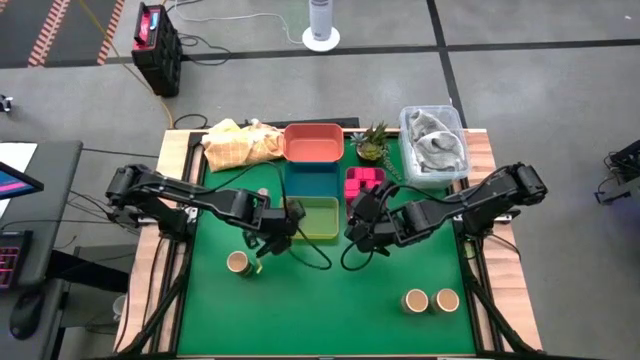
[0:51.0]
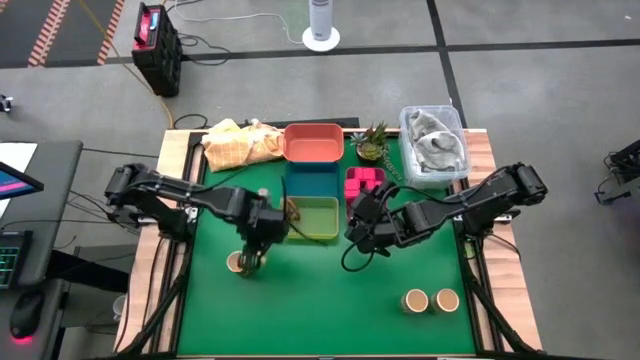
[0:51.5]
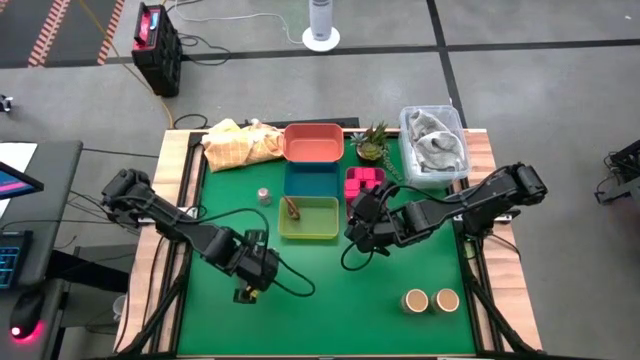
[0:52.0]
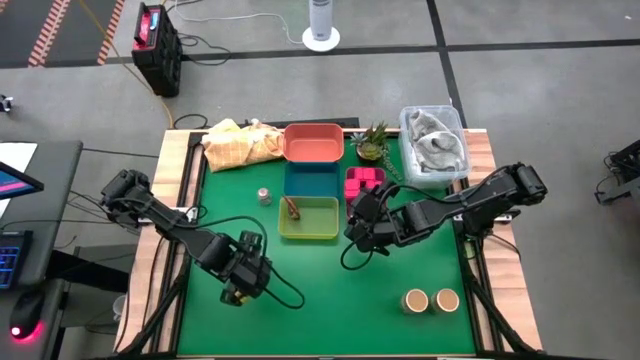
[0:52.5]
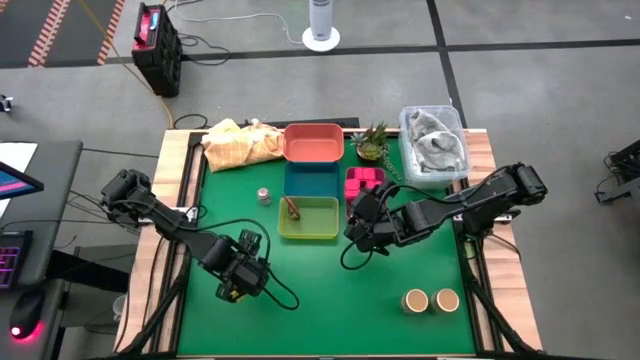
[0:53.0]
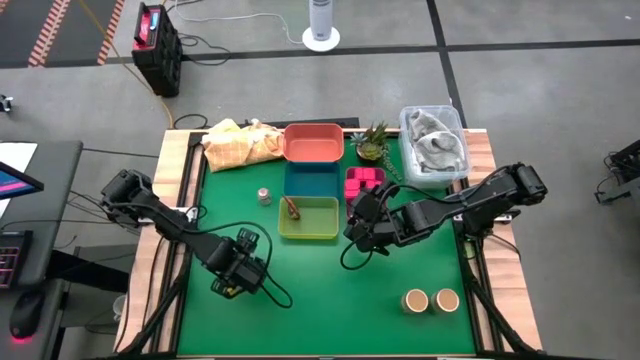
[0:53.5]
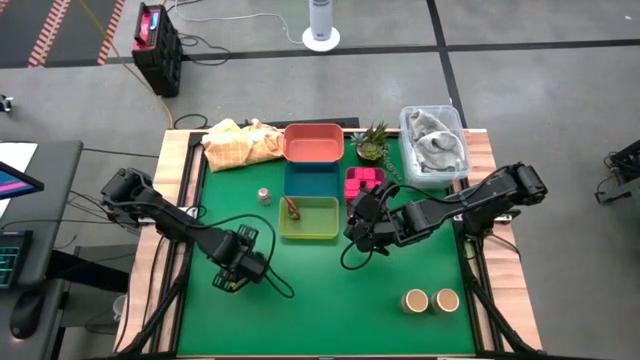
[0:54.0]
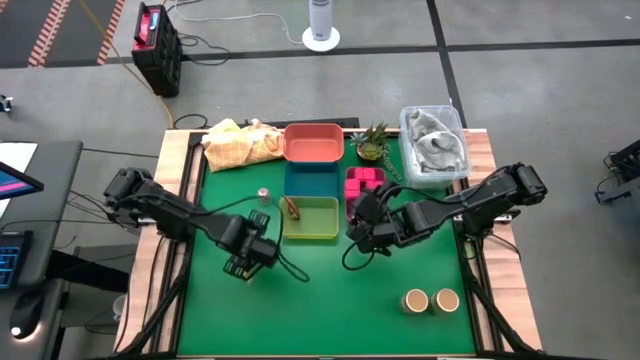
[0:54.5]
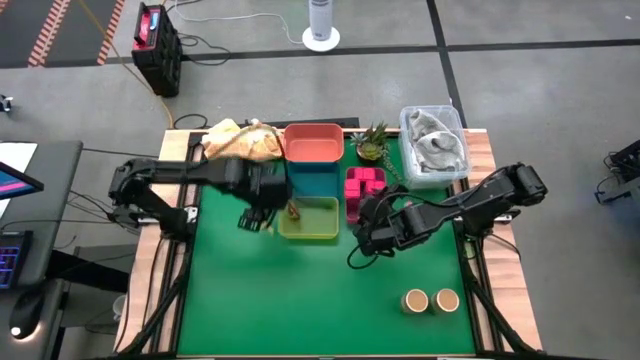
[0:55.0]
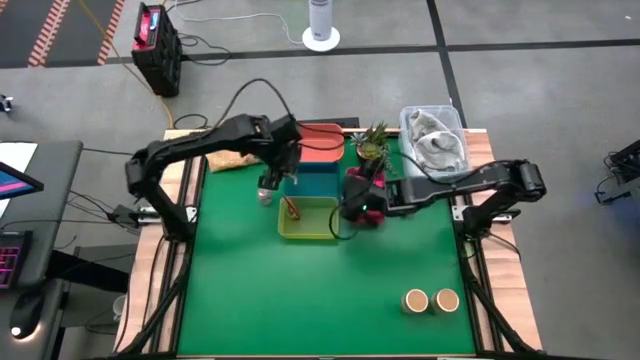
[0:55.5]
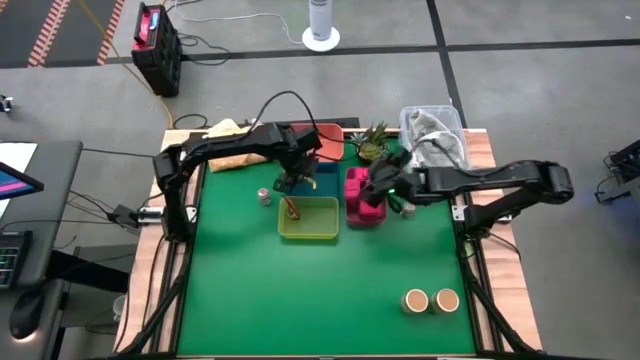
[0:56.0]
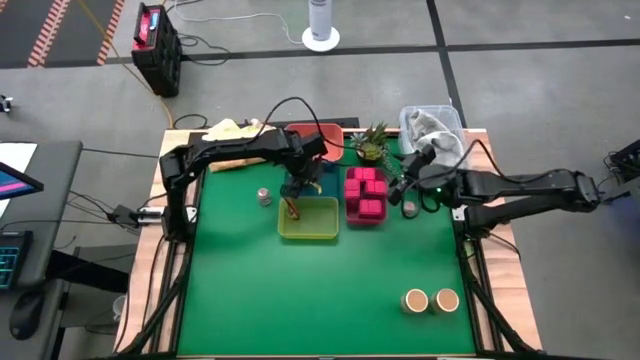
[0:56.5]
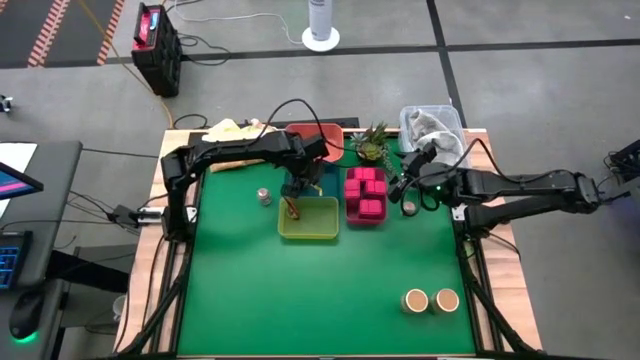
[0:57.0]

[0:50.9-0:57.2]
Task: Sort spices by type
Put the left gold seasoning bottle into the blue bin

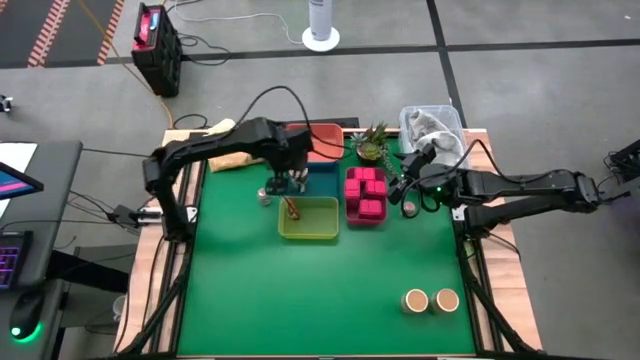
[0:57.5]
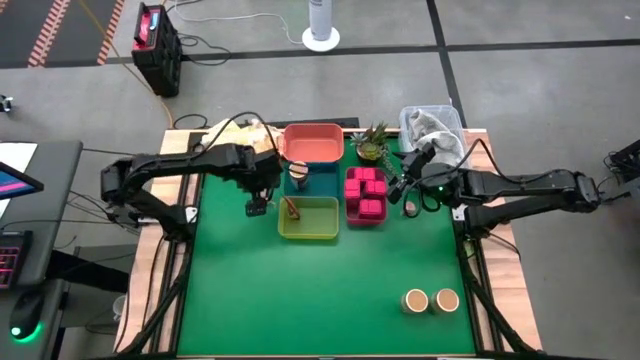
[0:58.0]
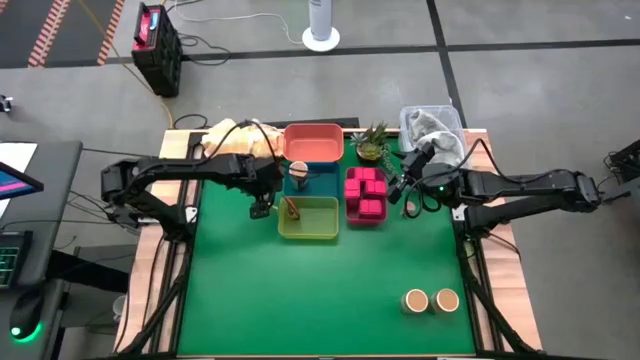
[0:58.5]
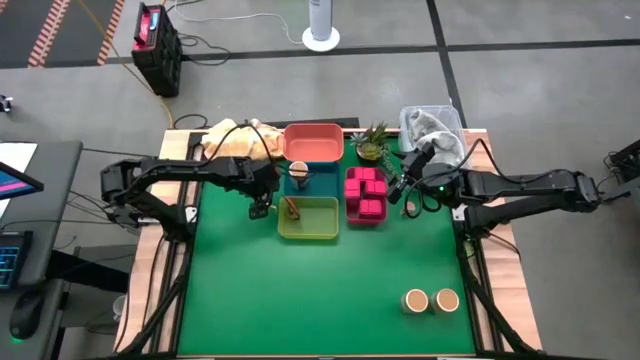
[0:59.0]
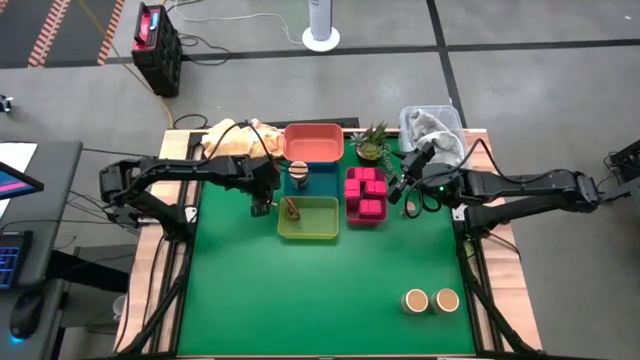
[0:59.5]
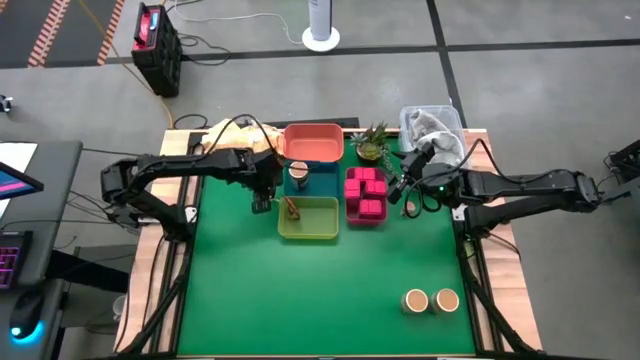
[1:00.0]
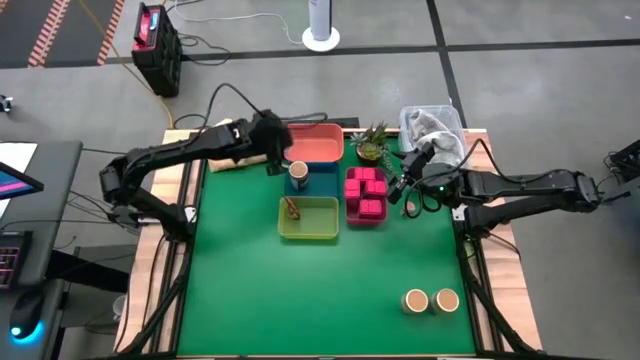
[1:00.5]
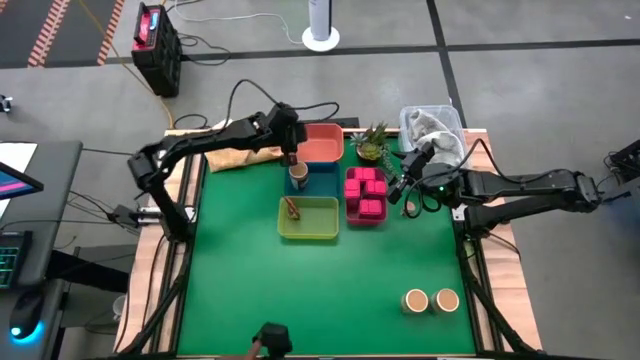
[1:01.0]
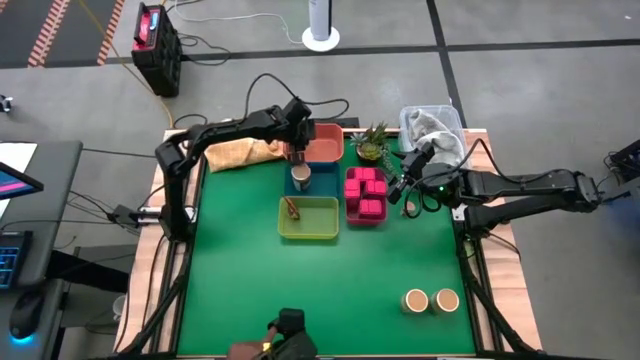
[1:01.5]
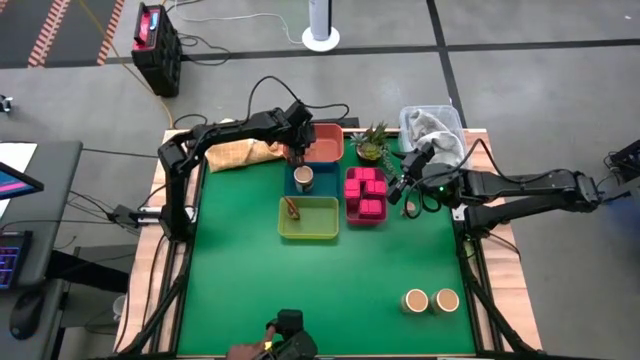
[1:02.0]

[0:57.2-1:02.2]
Put the left transparent seasoning bottle into the orange bin

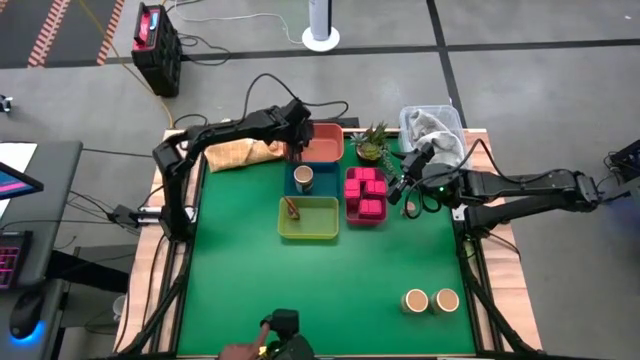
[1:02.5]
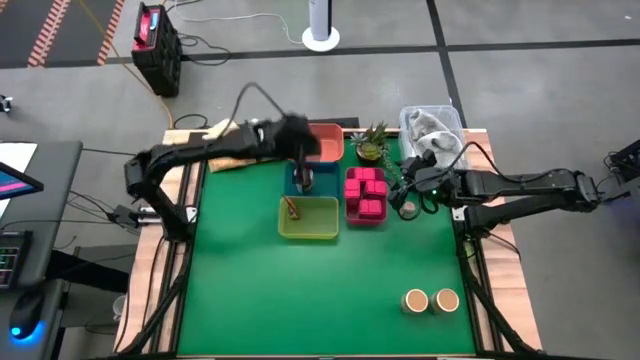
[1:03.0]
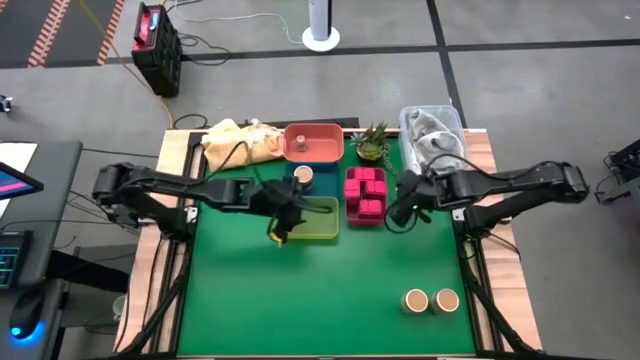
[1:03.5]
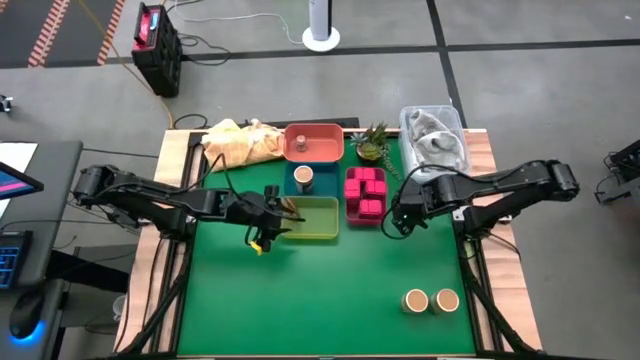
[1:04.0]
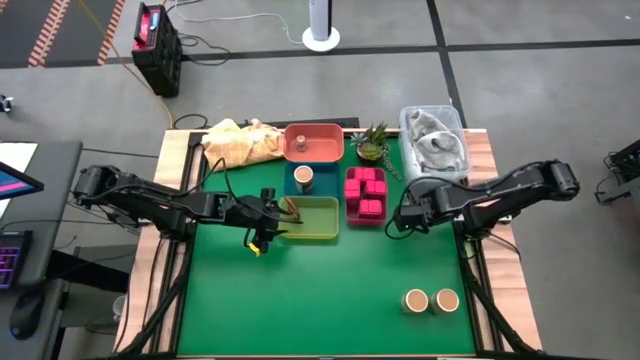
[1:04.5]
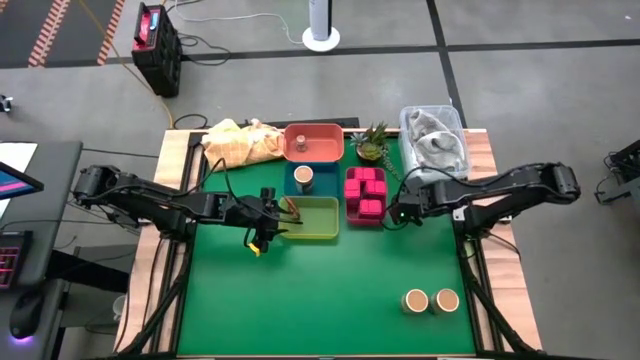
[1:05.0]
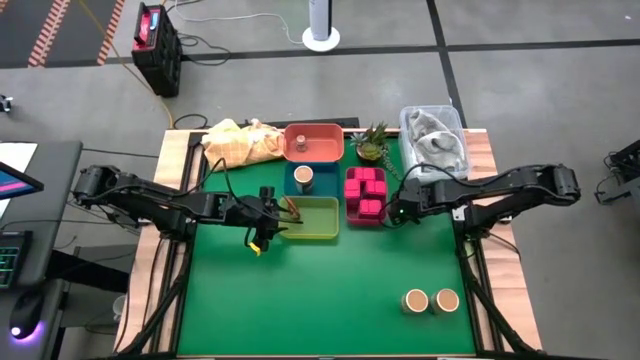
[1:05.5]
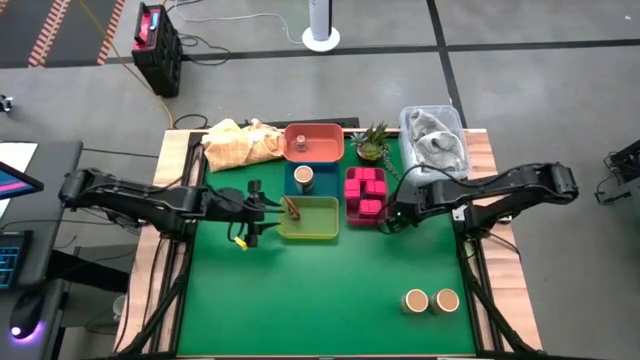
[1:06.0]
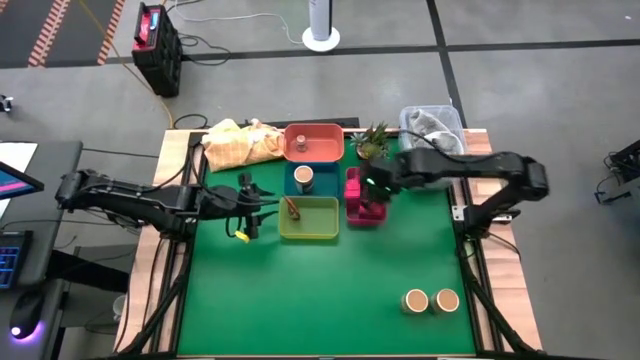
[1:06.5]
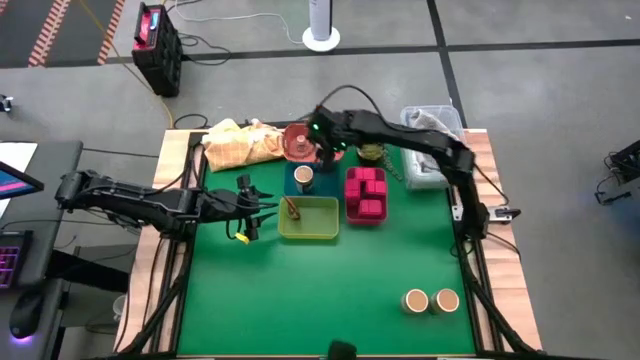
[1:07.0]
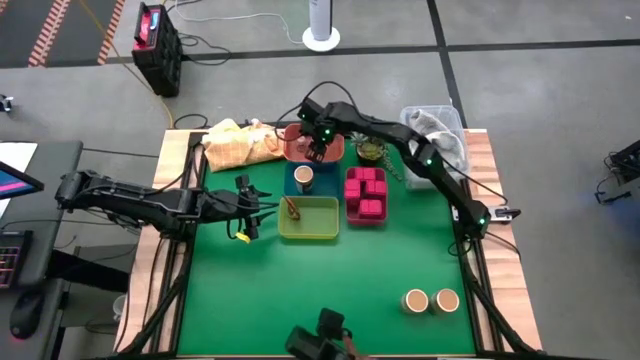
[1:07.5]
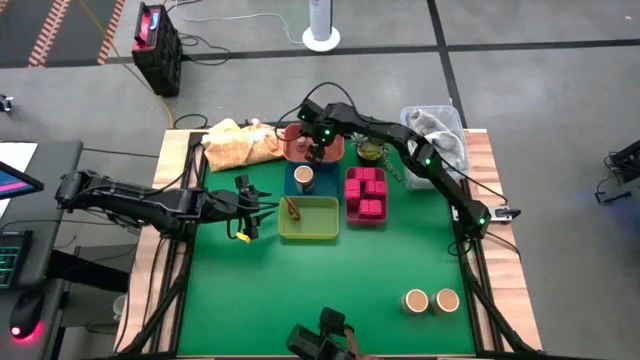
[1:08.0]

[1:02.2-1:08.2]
Put the transparent seasoning bottle into the orange bin

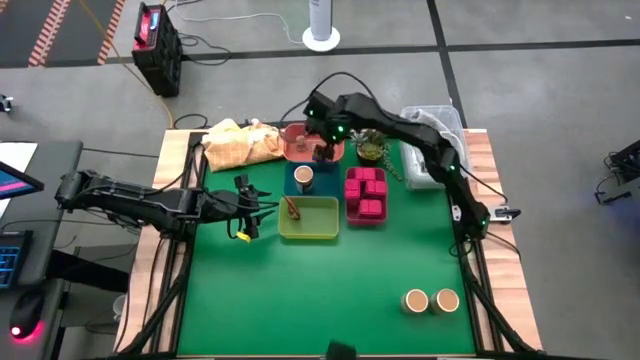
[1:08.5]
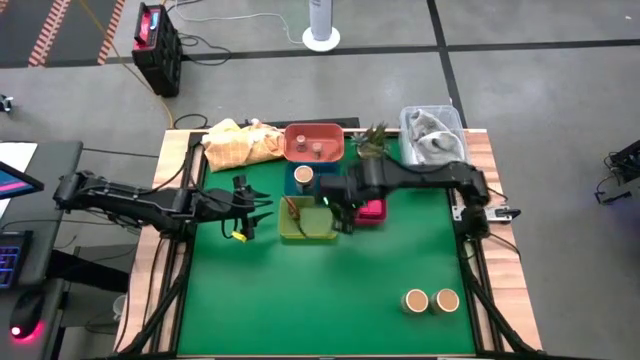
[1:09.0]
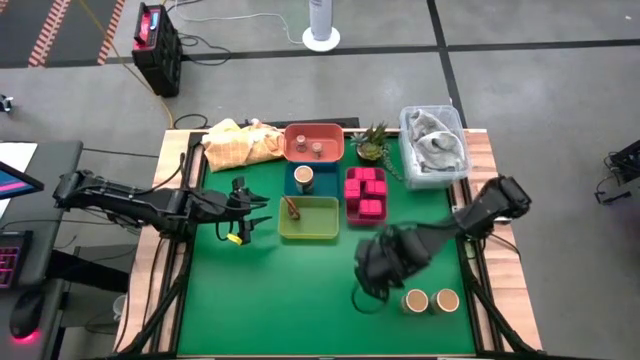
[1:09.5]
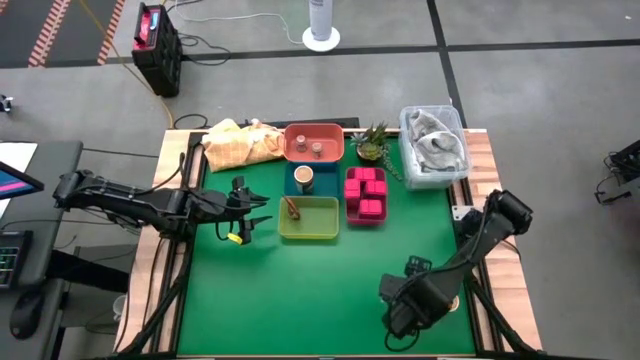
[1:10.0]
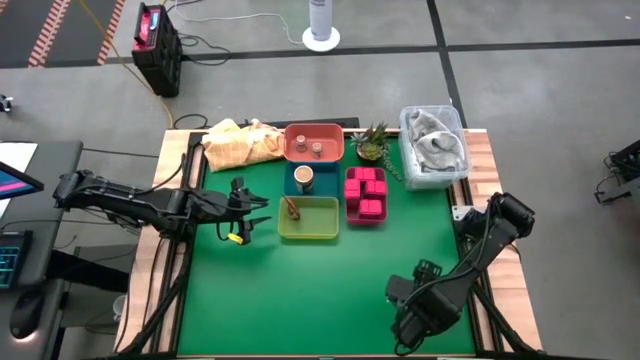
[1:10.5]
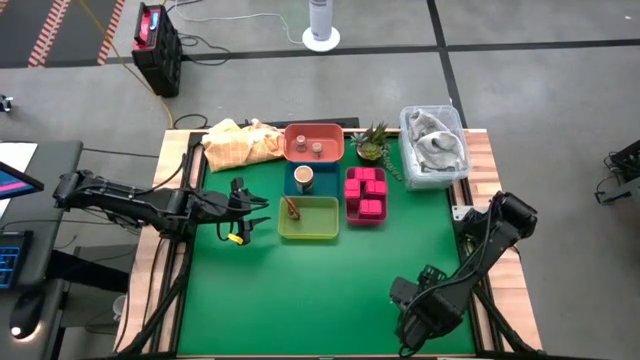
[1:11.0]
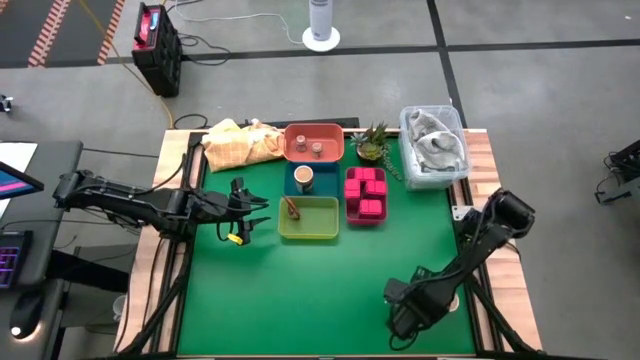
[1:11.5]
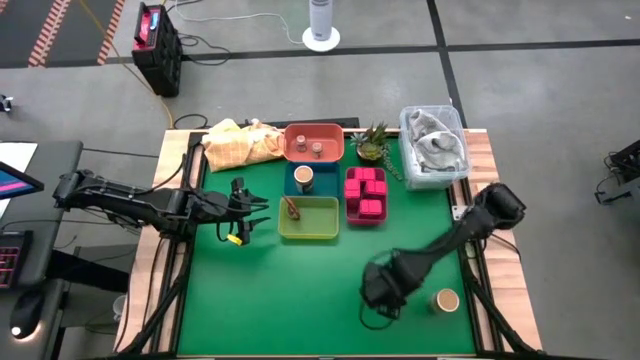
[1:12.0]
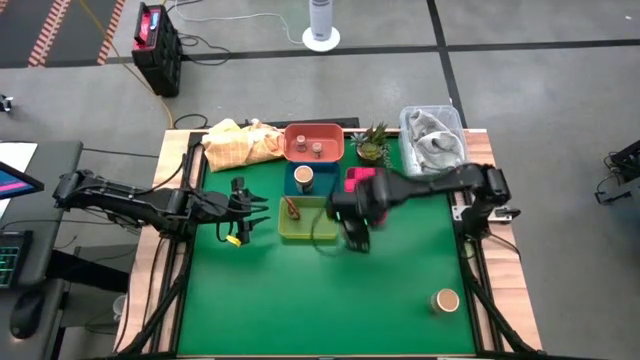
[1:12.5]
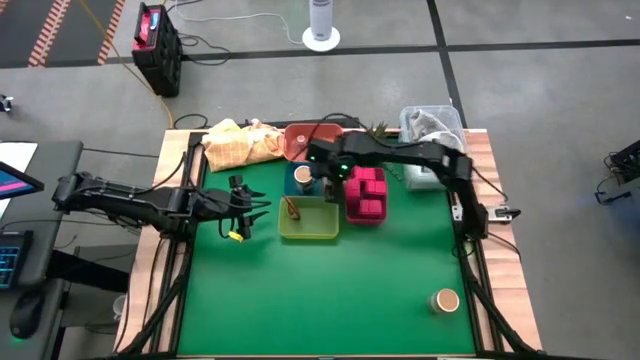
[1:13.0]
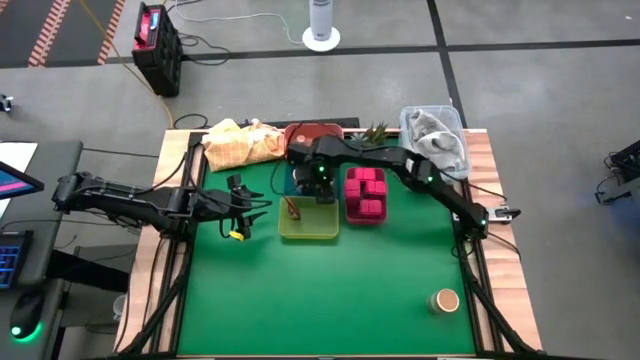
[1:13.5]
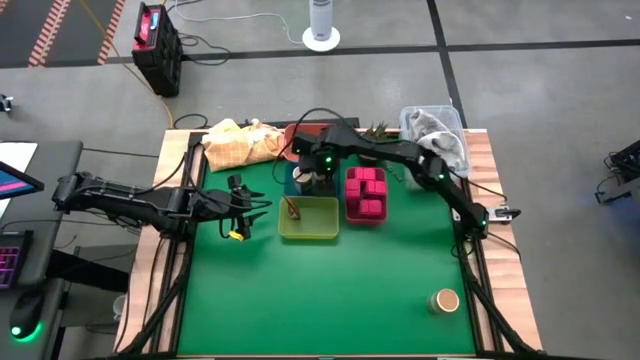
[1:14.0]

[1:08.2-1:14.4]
Put the right gold seasoning bottle into blue bin
